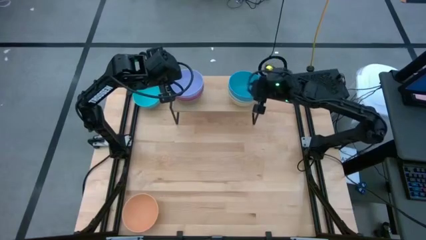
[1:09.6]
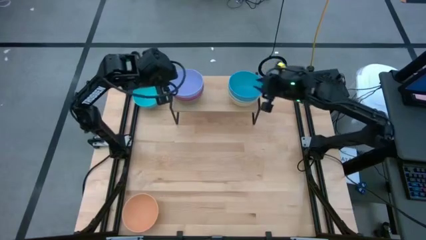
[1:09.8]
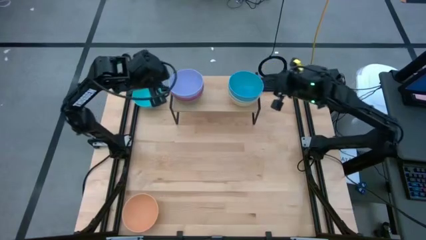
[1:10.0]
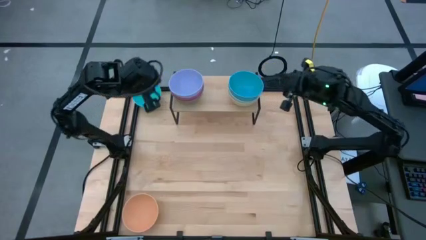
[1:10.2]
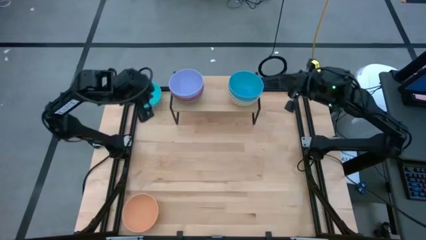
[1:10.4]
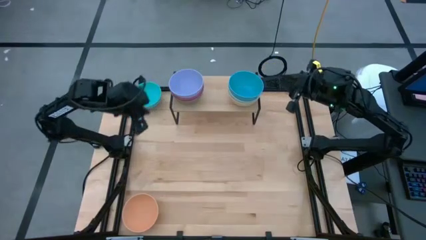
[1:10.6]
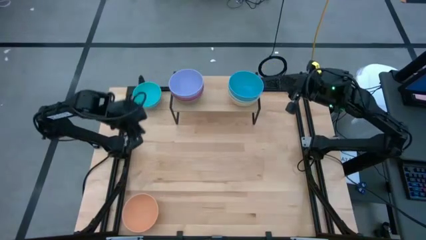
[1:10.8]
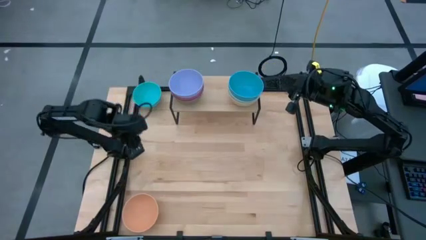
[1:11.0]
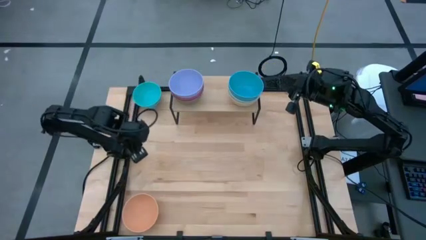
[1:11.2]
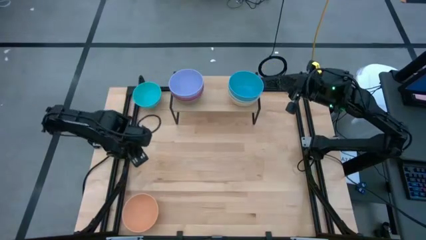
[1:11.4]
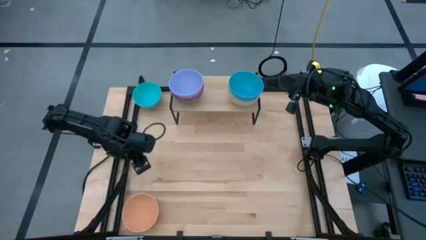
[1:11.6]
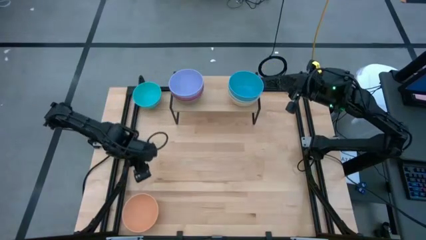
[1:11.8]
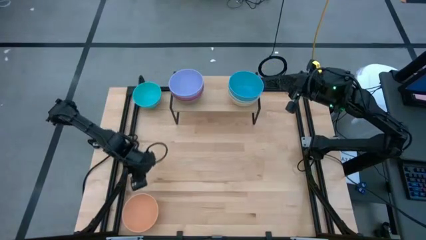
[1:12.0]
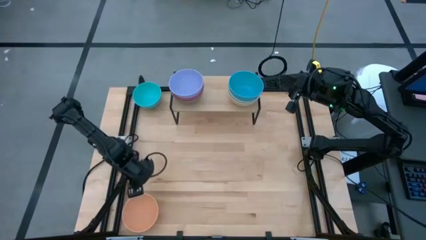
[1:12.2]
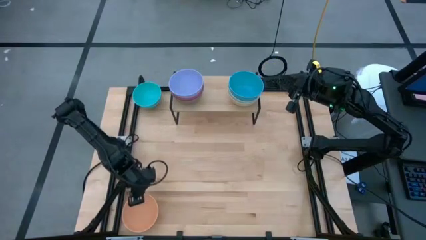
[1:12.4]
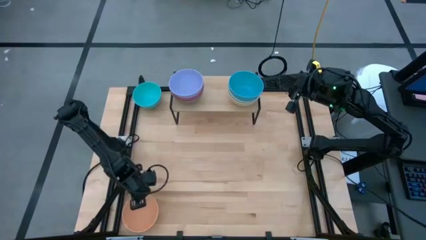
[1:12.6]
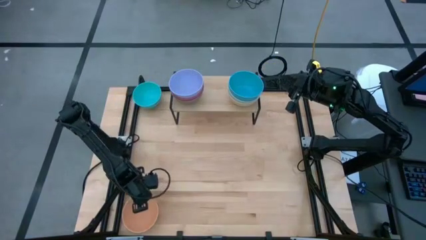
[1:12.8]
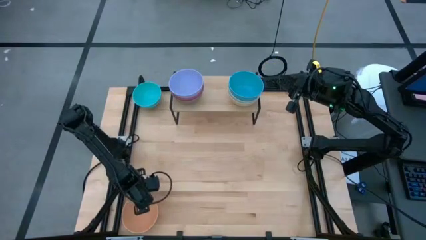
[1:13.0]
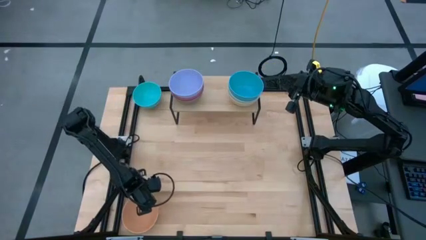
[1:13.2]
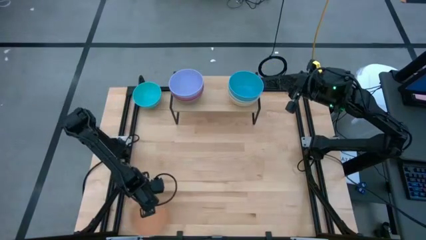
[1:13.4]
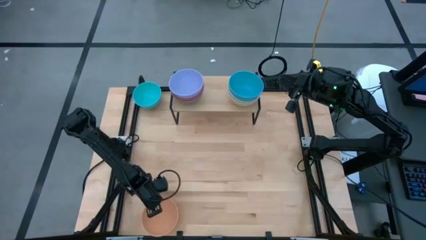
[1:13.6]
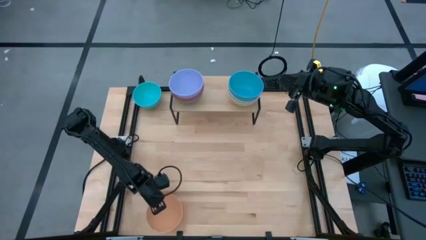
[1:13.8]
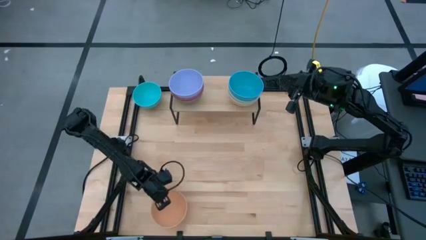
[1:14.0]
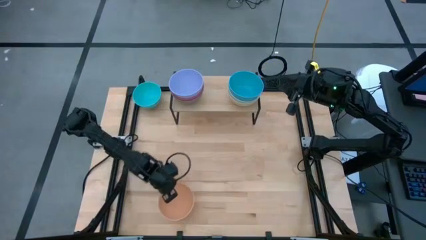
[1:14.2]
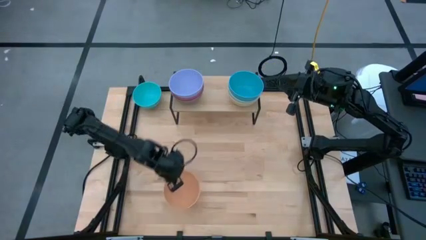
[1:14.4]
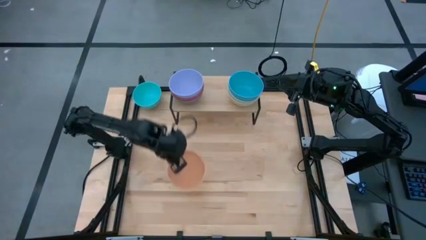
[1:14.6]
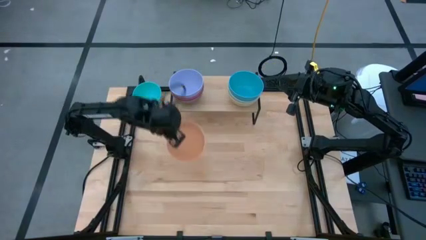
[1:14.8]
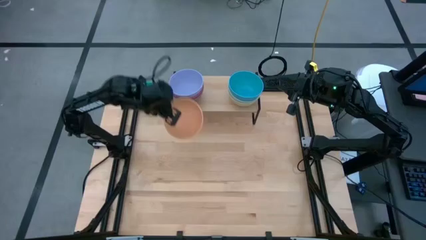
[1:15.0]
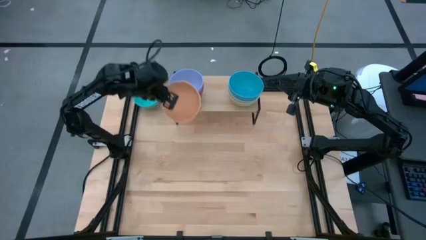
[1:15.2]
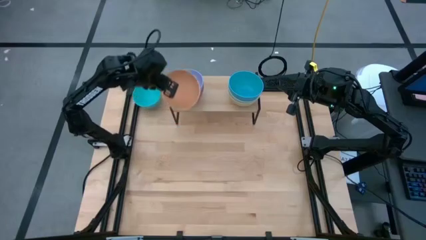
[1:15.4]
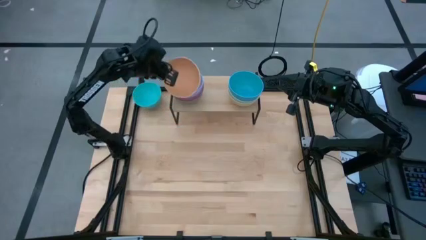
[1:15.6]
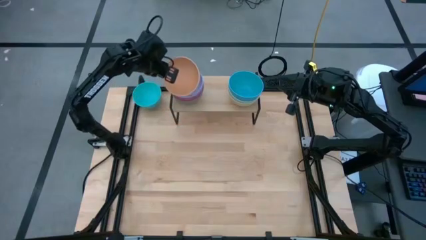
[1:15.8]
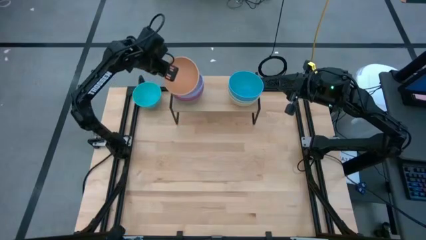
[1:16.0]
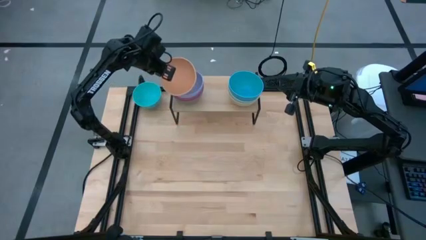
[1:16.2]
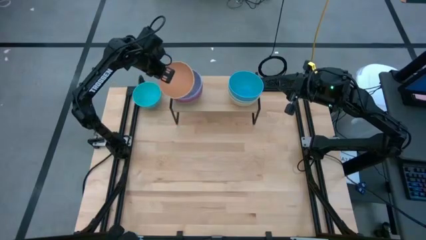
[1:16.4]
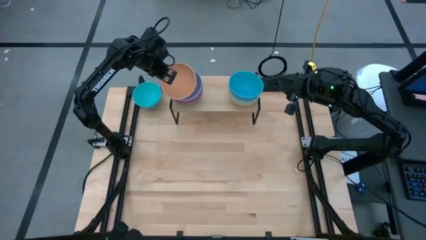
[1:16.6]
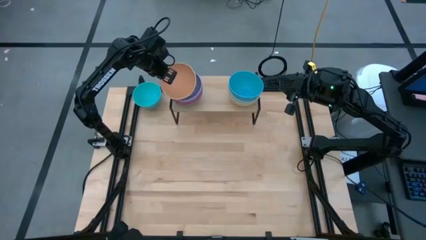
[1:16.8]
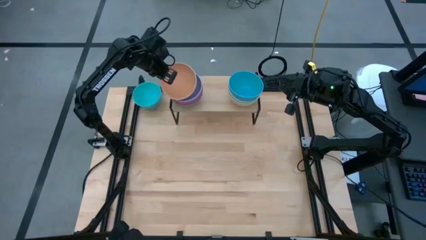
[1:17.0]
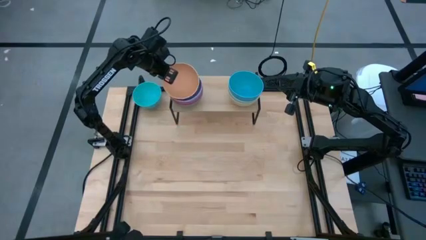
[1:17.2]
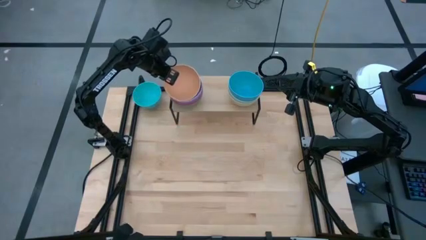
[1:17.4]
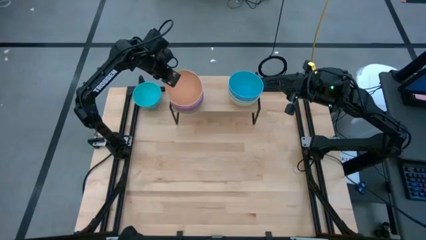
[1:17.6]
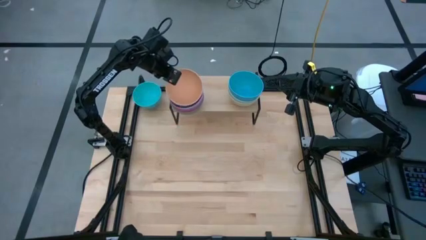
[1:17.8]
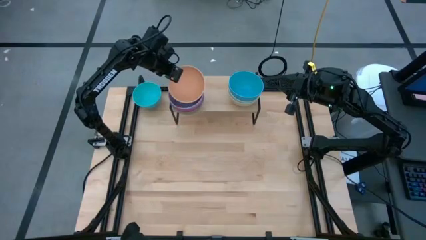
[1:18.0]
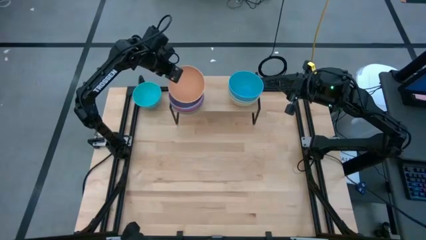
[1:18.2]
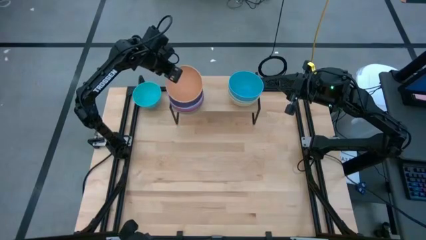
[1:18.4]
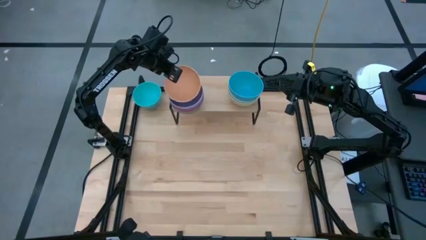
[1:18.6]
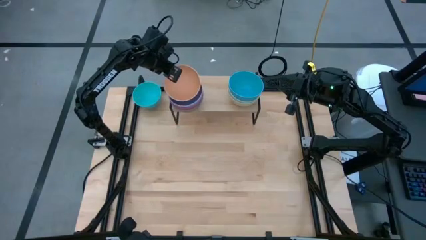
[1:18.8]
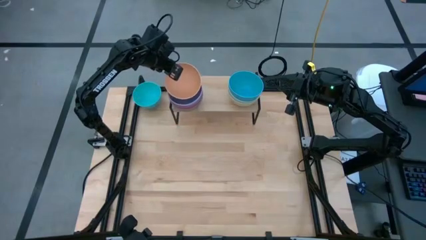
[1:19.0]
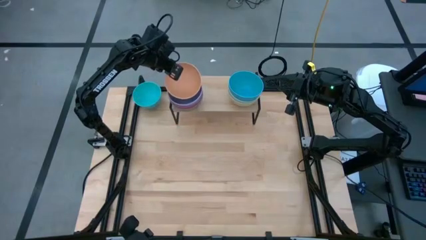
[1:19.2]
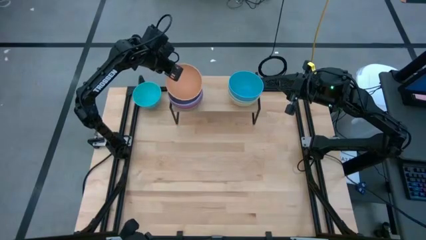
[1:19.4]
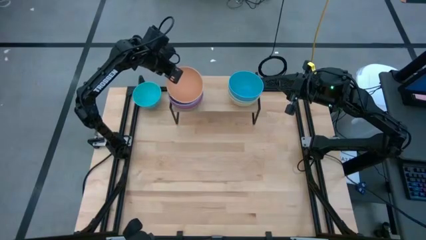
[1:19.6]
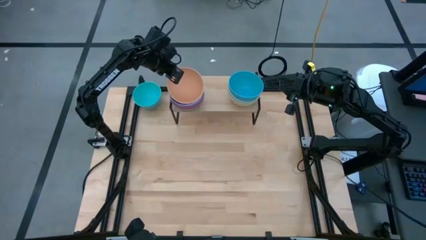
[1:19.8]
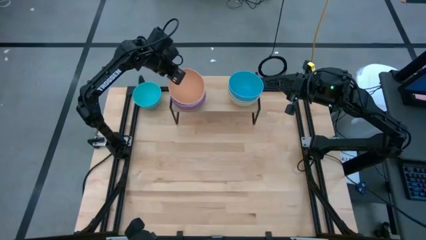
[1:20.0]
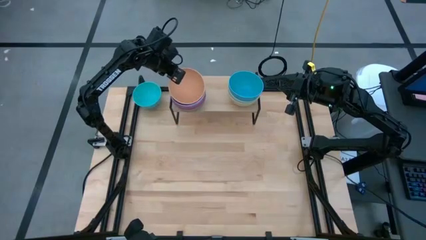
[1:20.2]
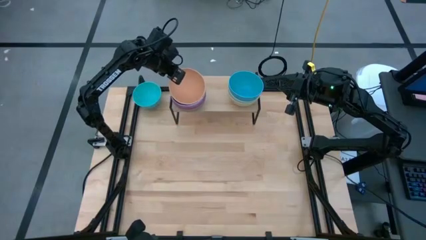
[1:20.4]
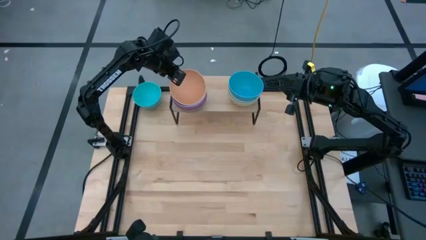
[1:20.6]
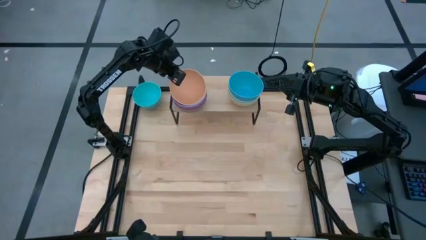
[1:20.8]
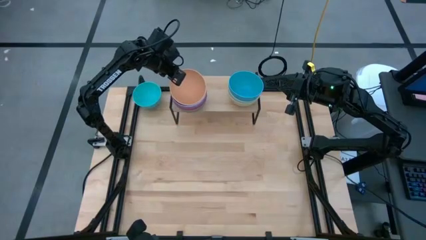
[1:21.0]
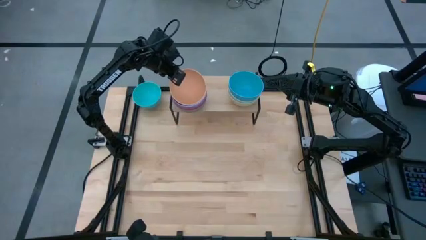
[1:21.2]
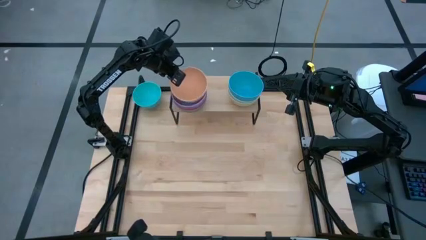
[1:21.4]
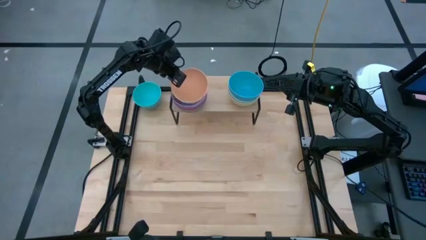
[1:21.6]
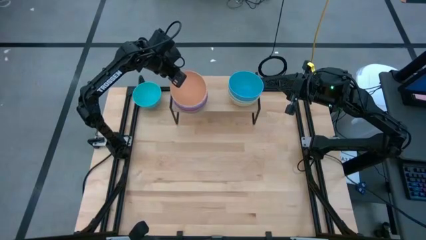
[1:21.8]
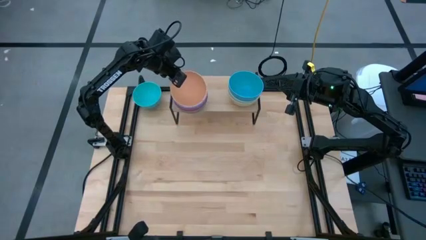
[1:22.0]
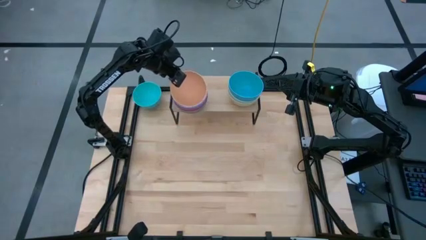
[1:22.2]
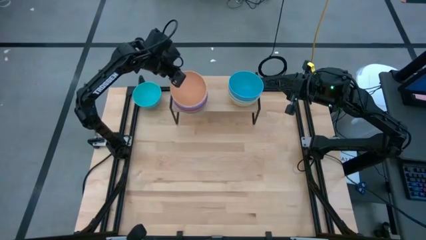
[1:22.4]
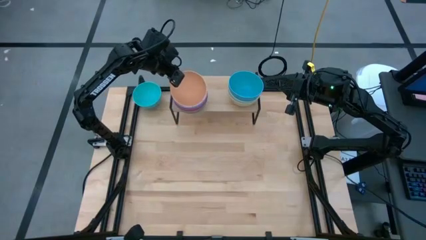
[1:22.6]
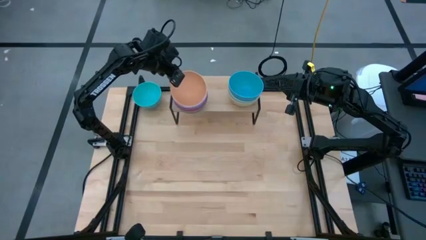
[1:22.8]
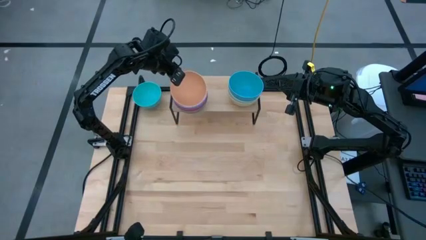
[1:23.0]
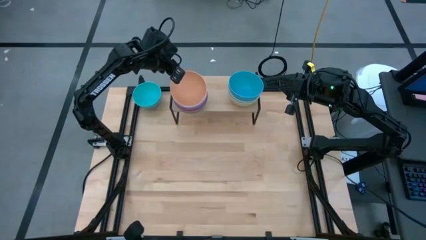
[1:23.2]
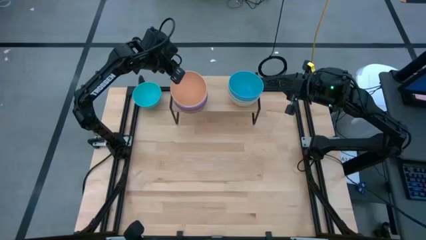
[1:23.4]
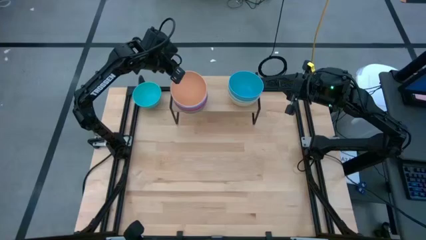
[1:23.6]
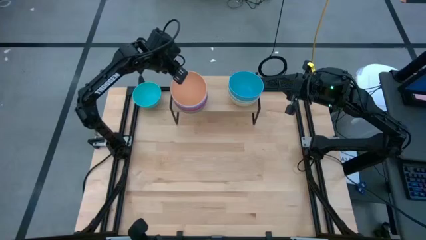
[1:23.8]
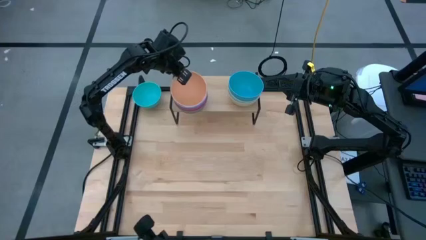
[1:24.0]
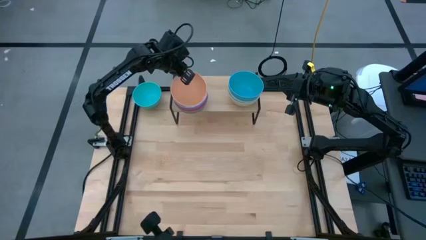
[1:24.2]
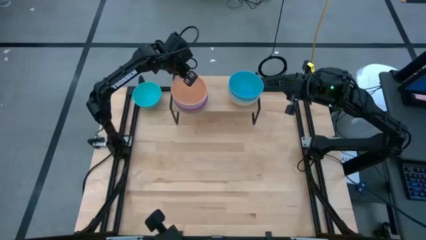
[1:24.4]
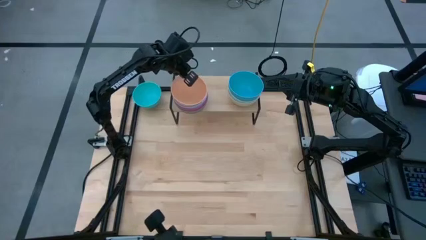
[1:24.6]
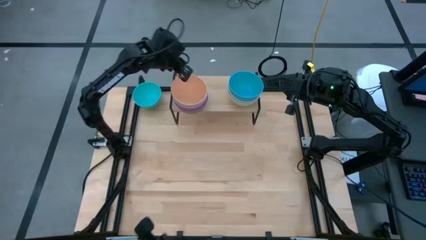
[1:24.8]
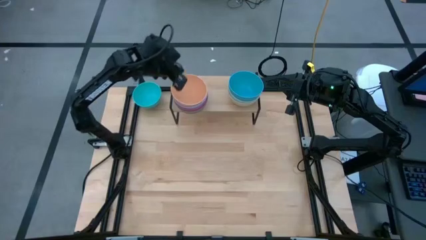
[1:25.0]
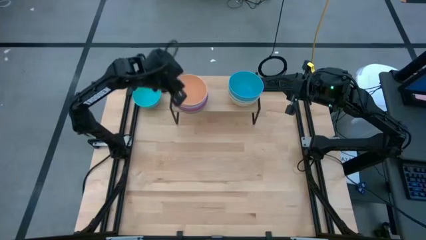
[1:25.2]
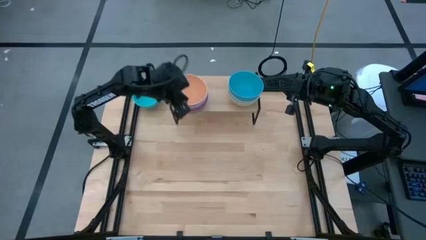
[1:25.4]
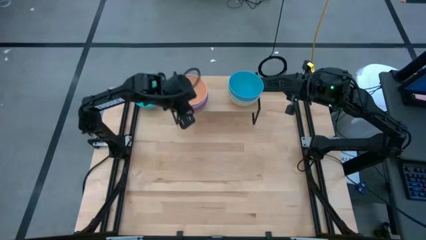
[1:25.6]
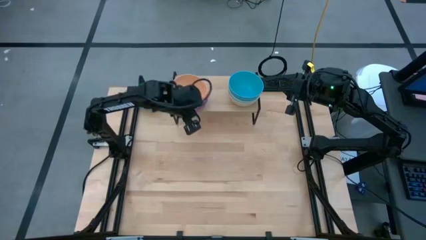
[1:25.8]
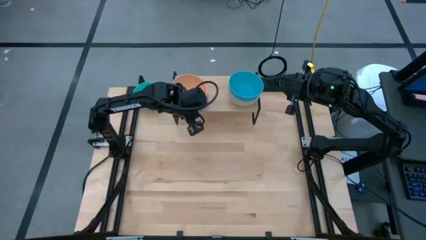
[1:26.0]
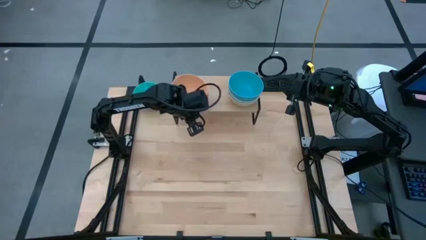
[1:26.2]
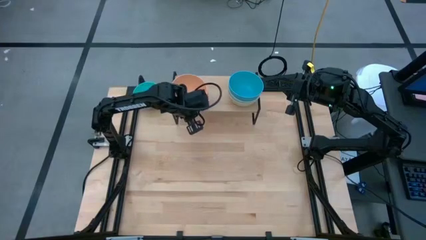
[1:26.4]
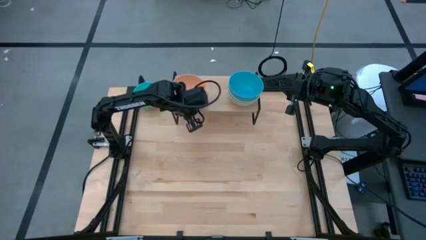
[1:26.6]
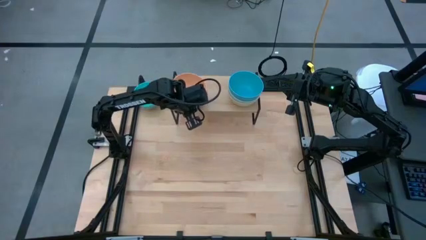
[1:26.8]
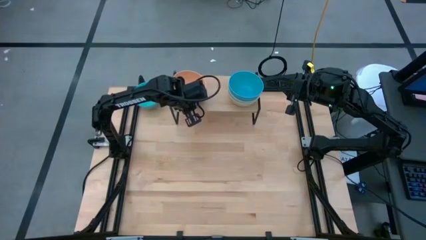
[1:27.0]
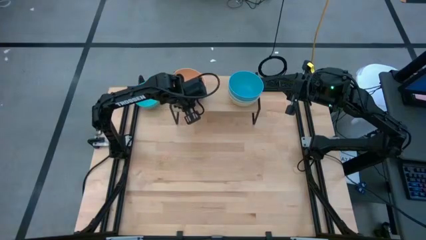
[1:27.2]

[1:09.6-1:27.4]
Task: Place and stack bowls onto a shelf
Stack the orange bowl on top of the purple bowl on the shelf
